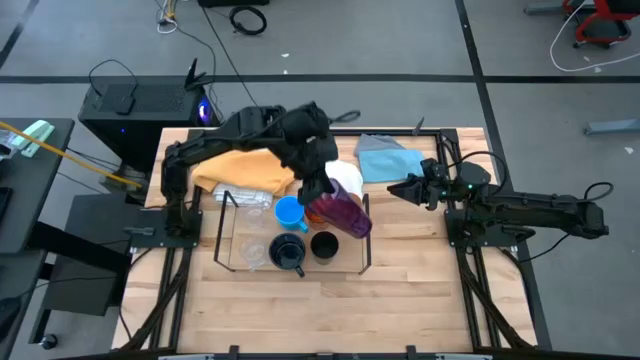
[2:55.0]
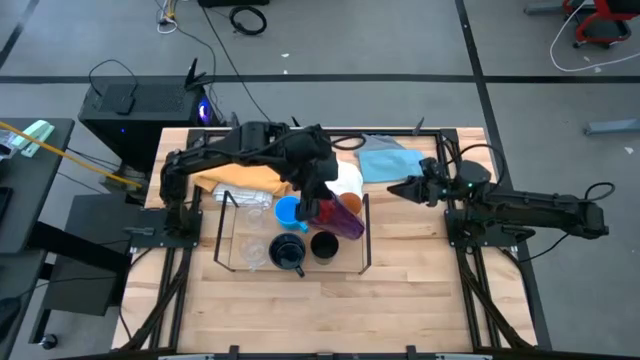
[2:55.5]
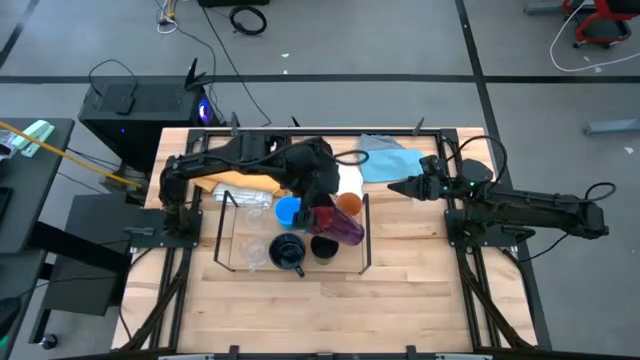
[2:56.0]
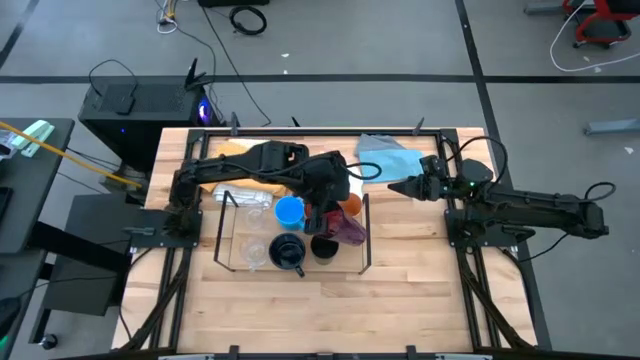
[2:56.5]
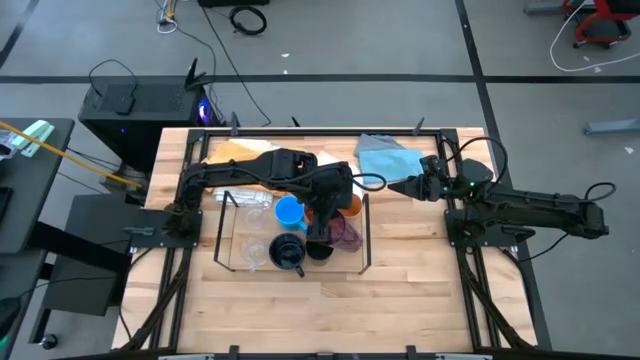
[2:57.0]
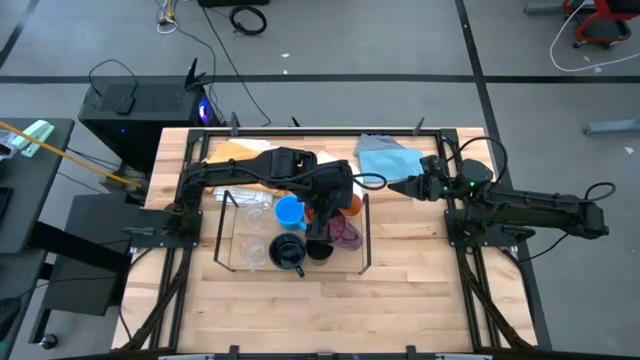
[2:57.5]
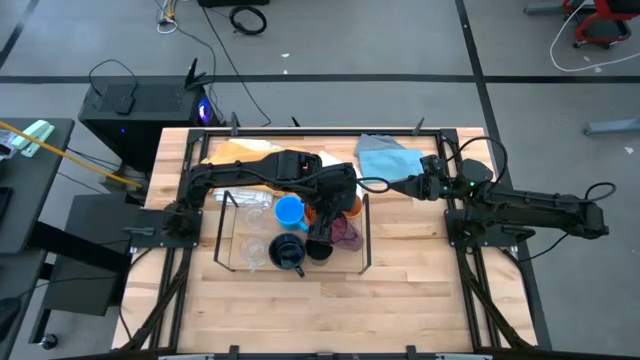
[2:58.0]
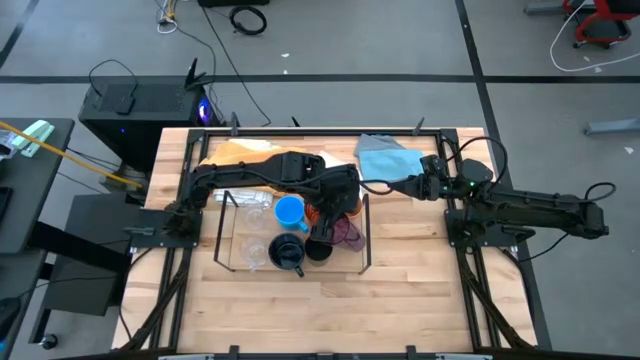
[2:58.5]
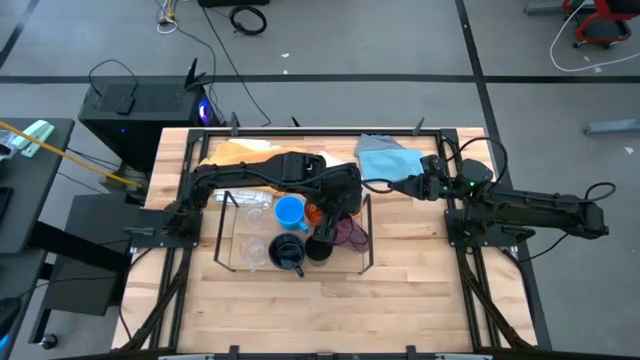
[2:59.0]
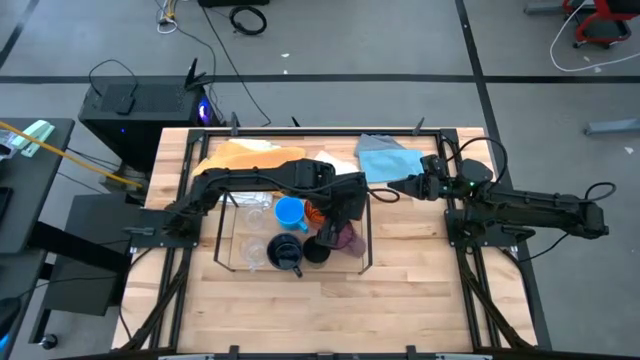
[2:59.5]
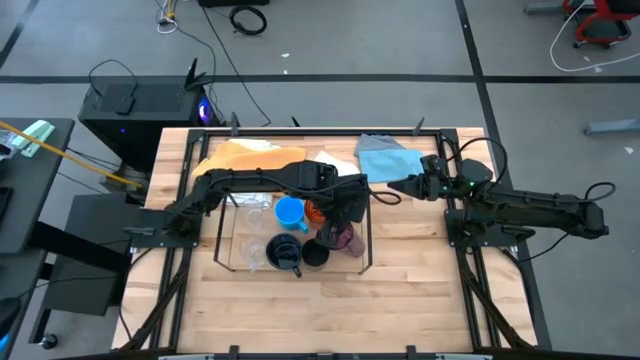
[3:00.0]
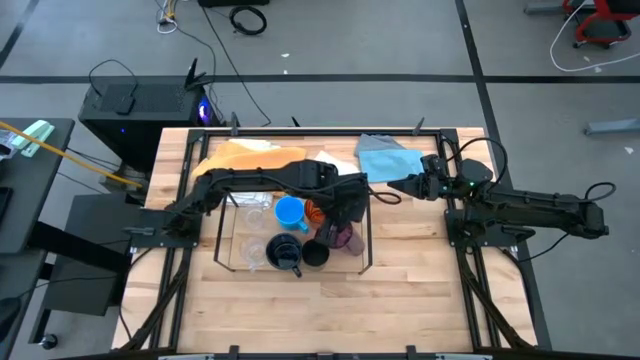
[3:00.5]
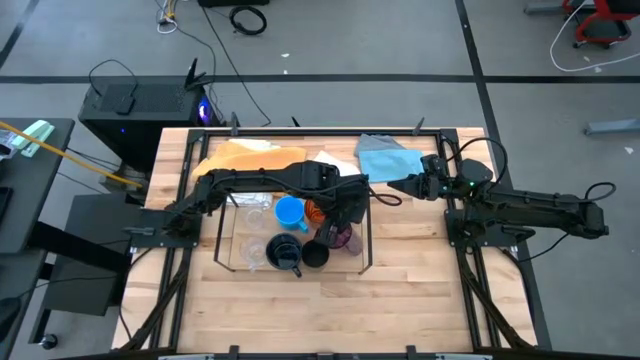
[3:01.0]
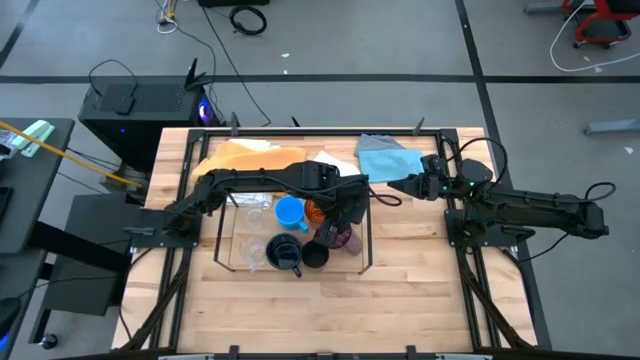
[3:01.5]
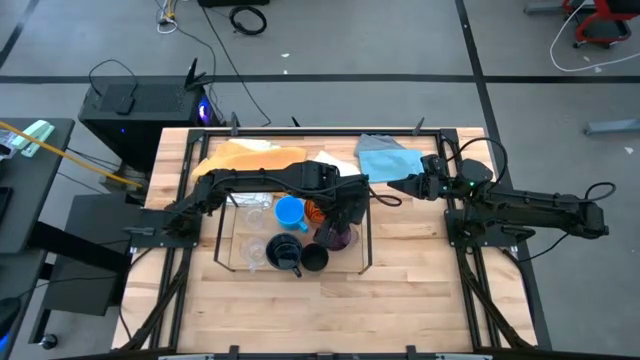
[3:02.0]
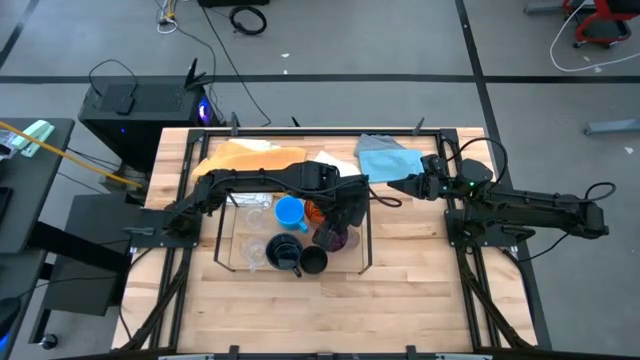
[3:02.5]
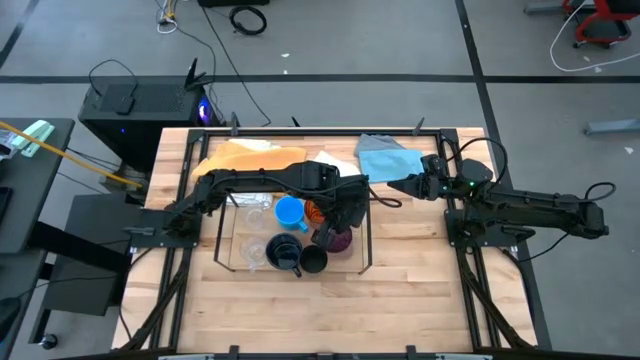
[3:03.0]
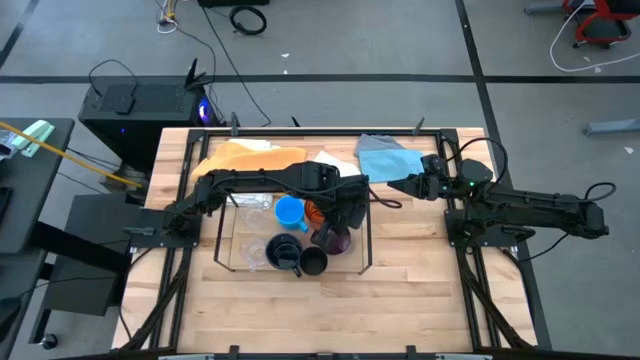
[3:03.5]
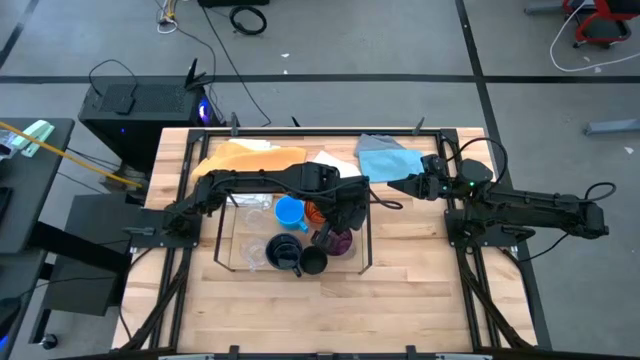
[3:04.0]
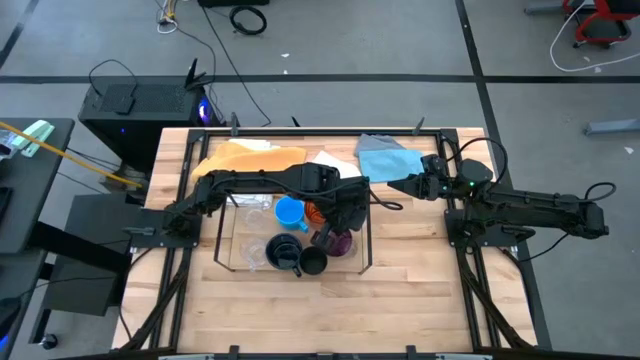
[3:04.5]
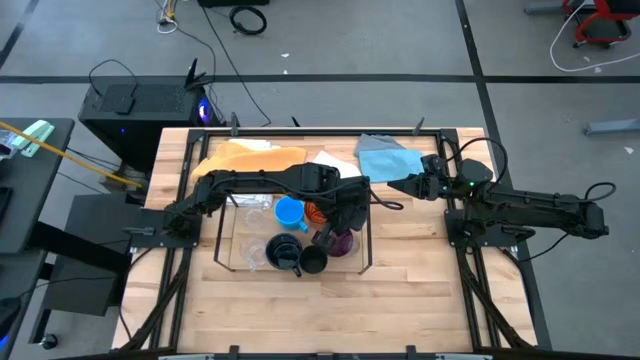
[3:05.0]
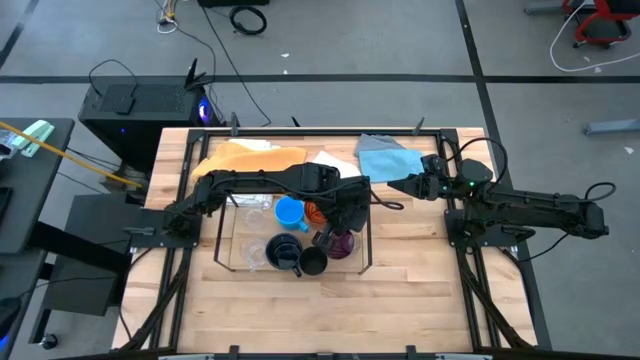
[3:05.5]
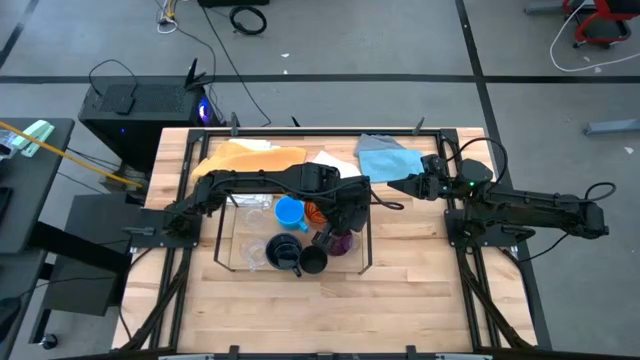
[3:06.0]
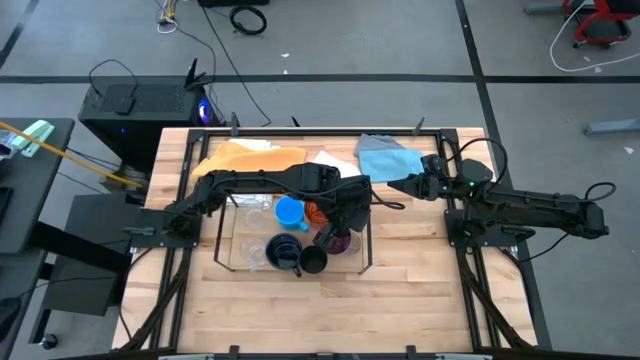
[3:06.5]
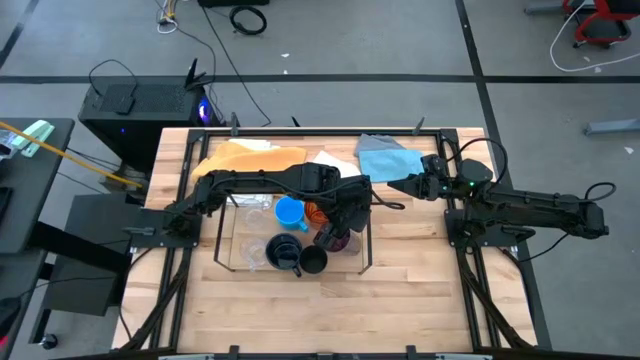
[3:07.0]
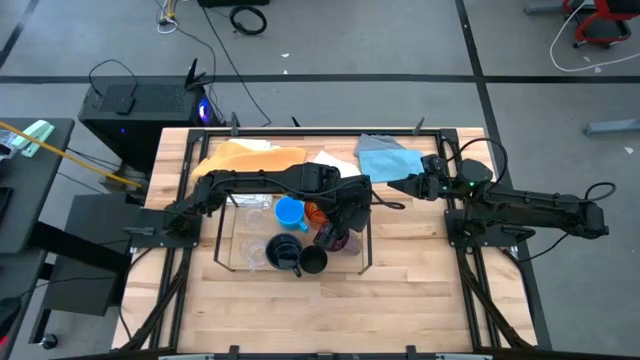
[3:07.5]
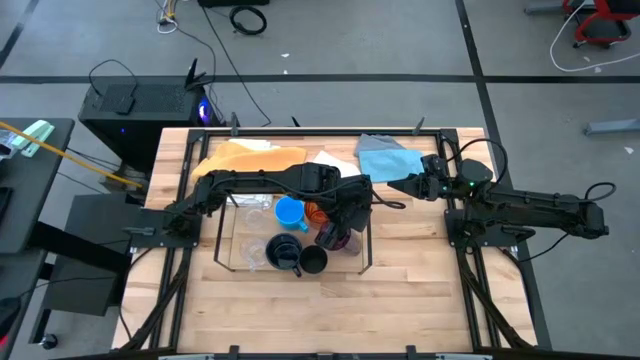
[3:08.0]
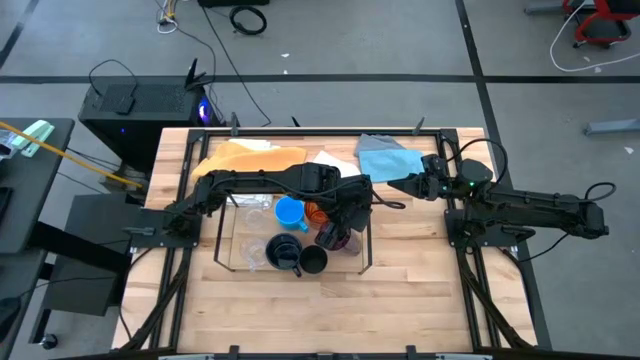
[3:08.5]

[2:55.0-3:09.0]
Task: Stack small to large cups/mugs on shelf
Put the purple cup on the shelf

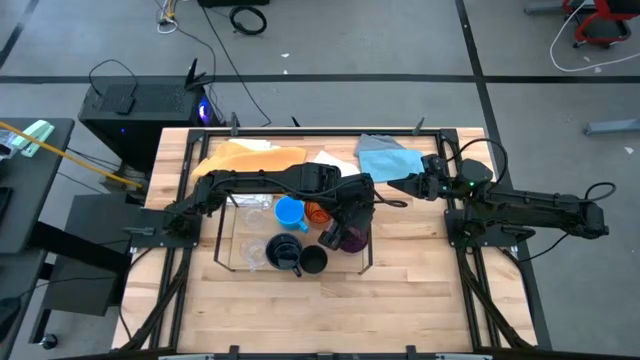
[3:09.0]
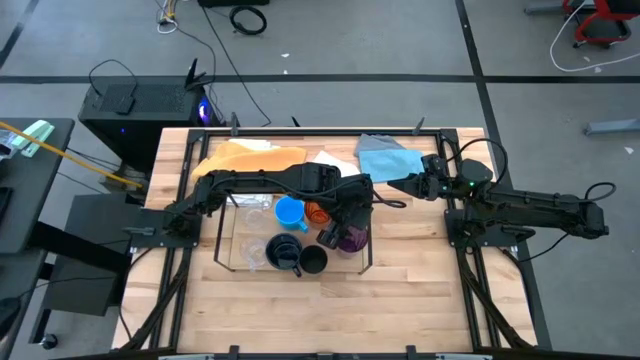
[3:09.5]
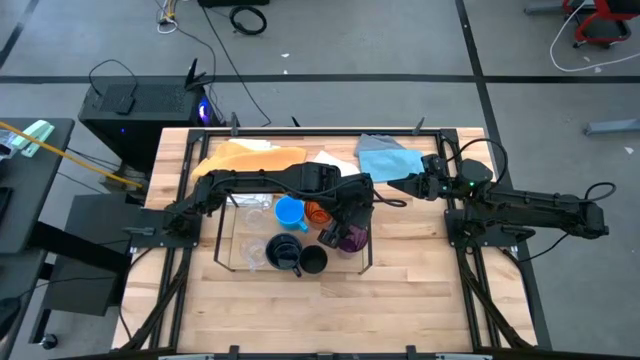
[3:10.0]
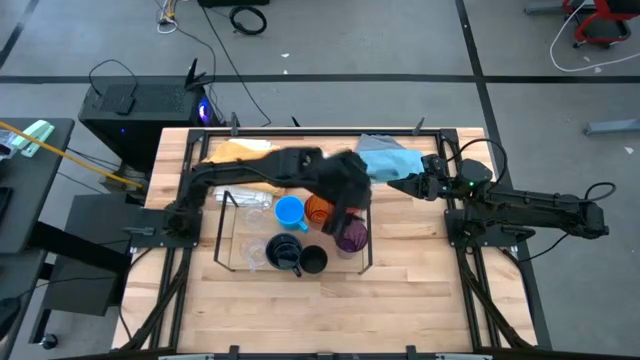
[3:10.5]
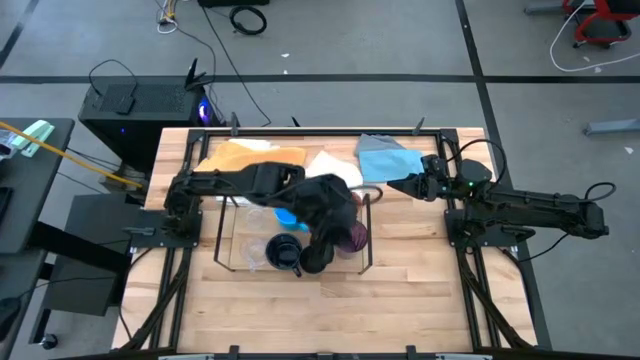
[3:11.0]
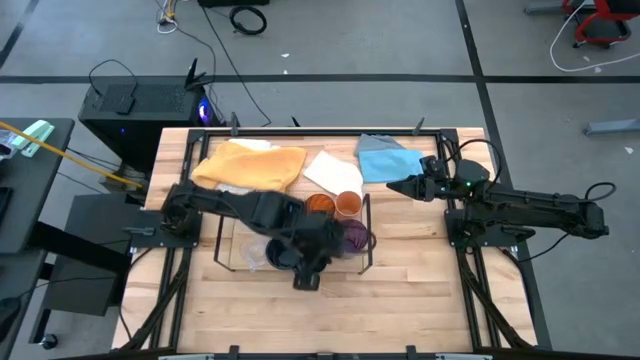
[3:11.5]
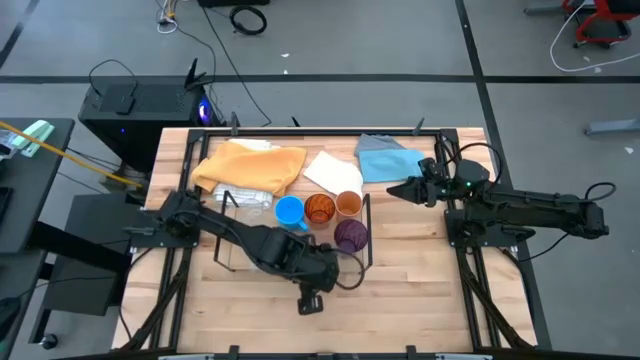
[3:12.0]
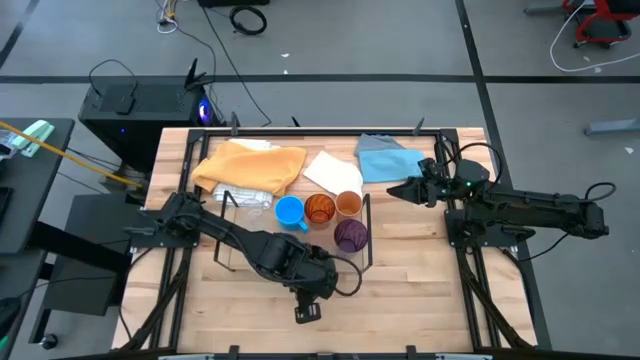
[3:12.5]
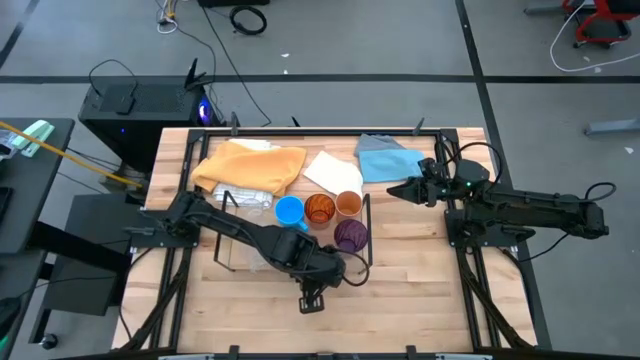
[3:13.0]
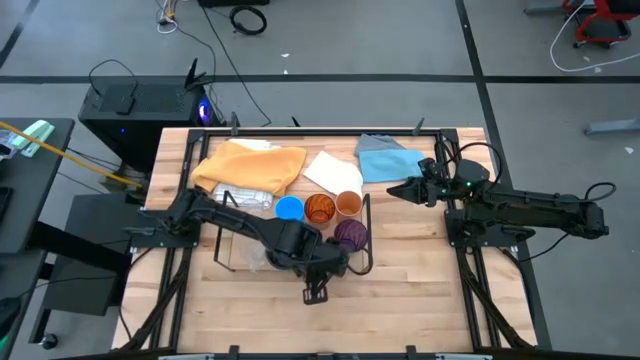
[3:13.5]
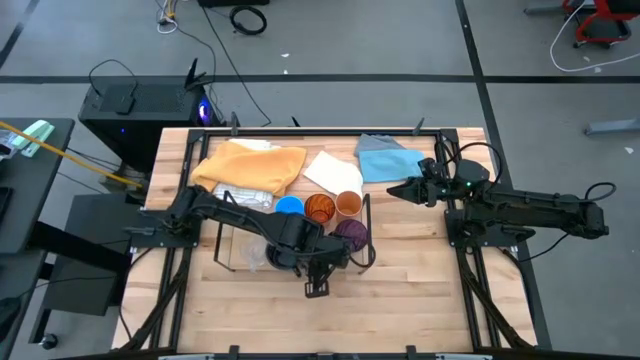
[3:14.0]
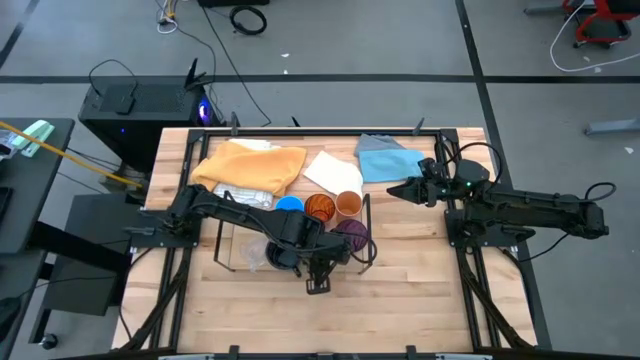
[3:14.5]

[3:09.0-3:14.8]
Adjust the black cup
